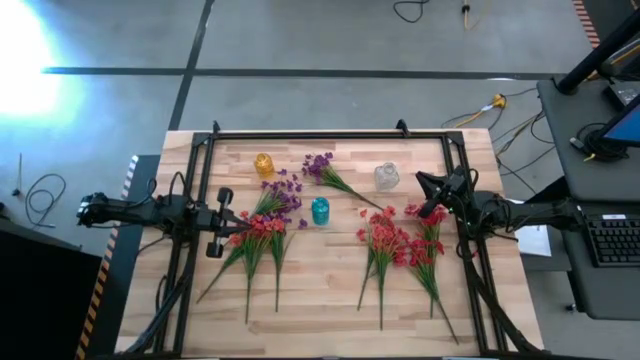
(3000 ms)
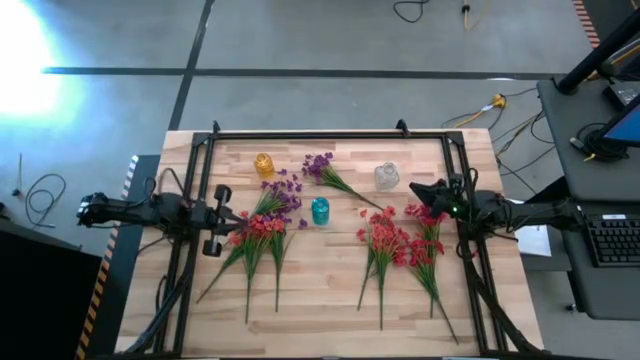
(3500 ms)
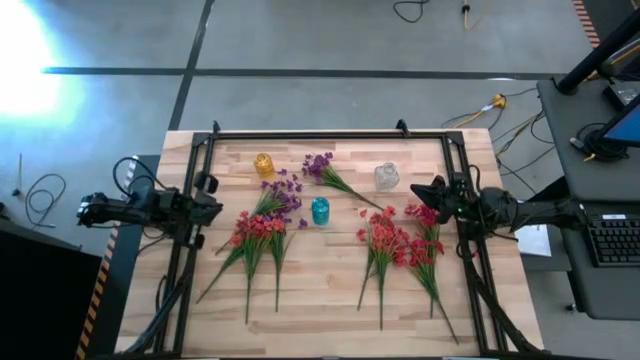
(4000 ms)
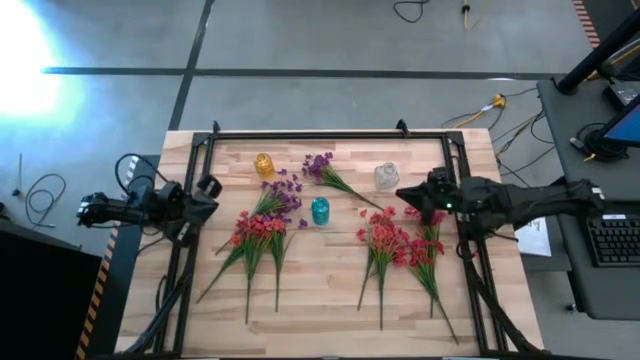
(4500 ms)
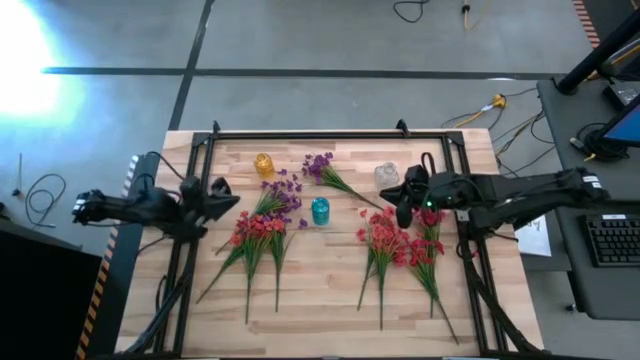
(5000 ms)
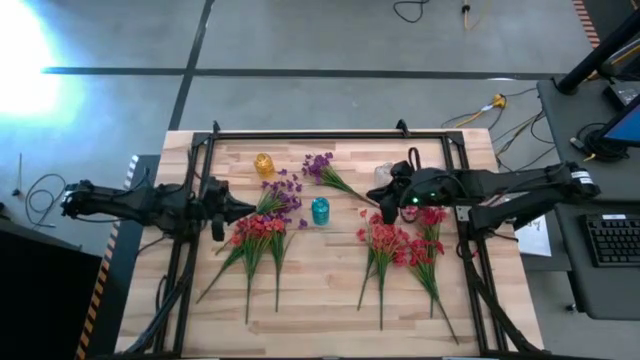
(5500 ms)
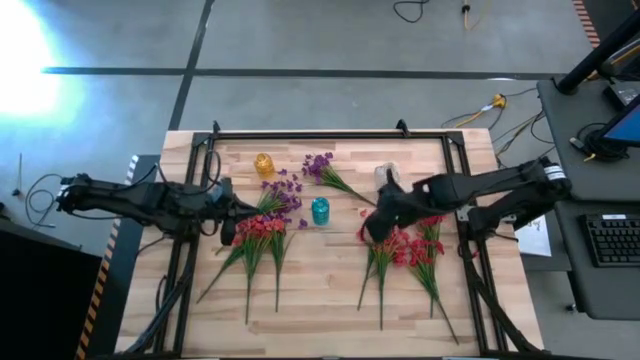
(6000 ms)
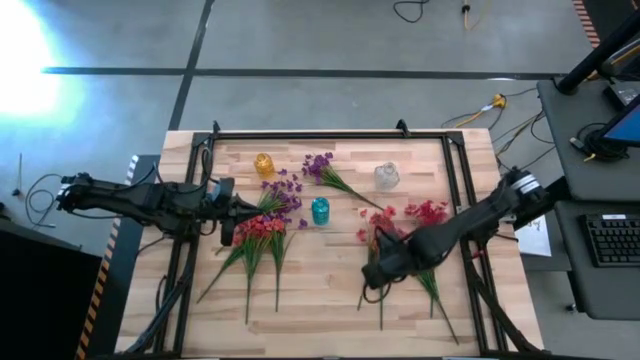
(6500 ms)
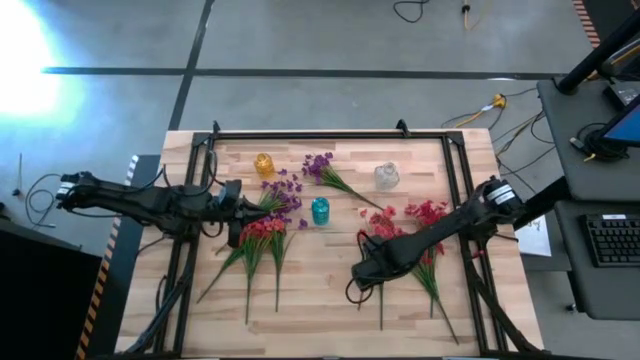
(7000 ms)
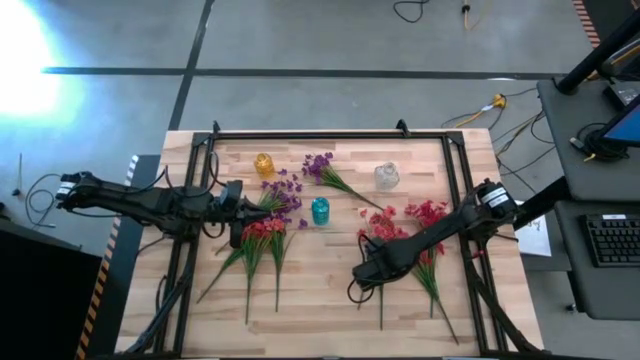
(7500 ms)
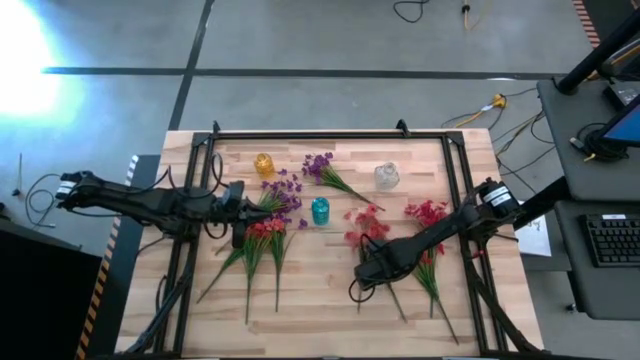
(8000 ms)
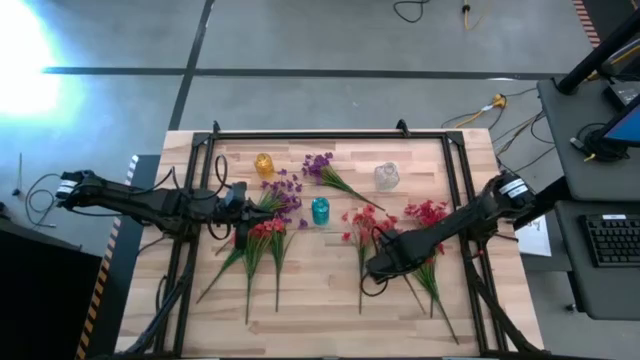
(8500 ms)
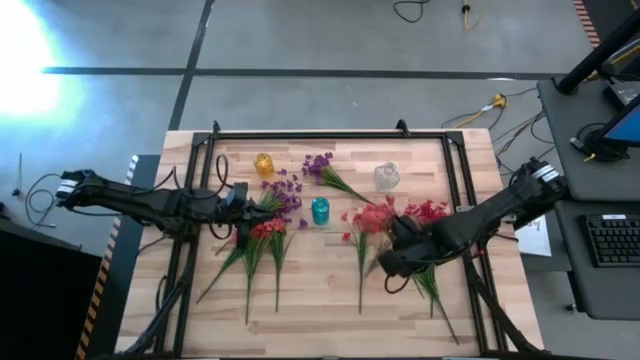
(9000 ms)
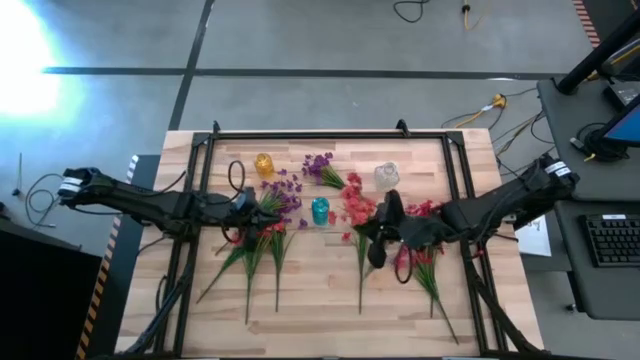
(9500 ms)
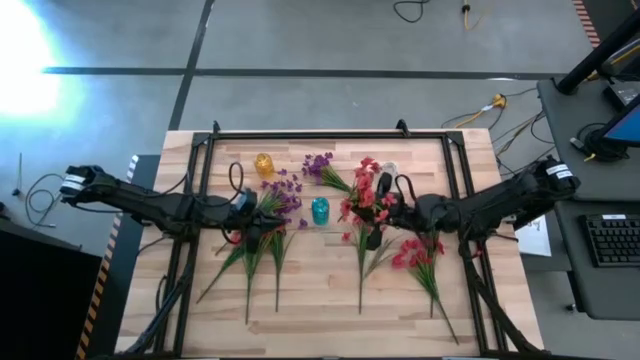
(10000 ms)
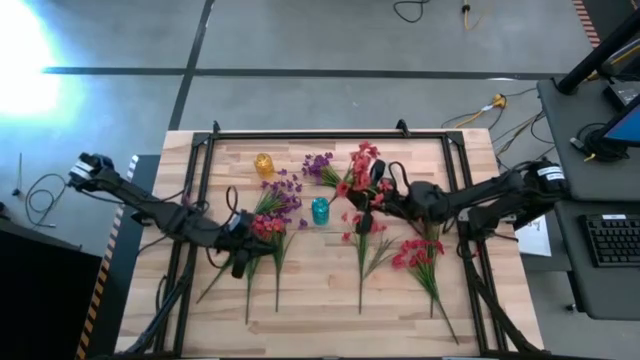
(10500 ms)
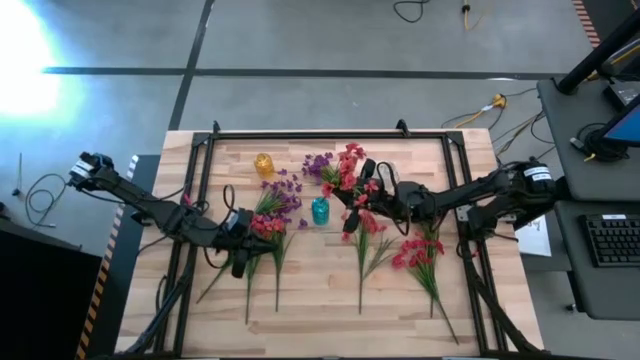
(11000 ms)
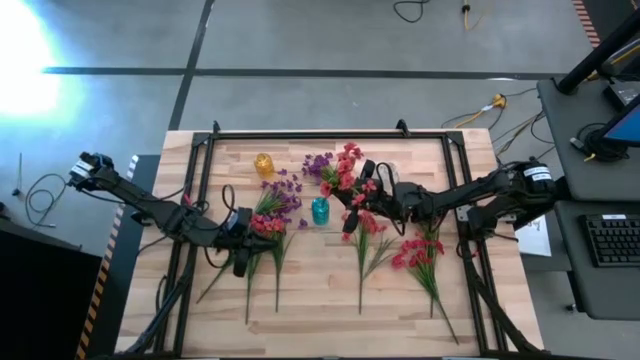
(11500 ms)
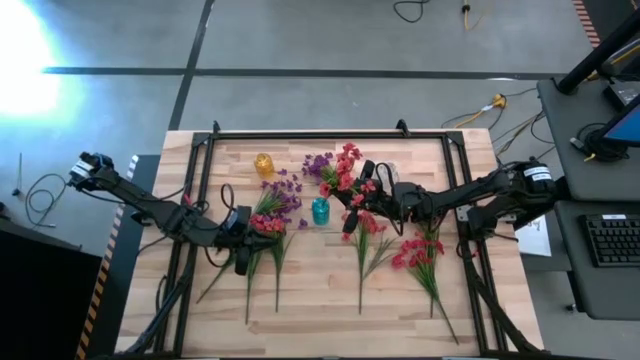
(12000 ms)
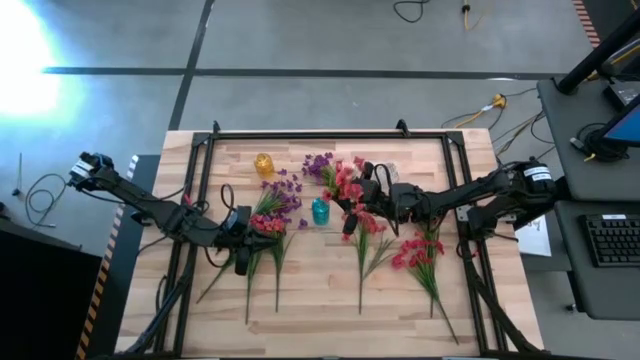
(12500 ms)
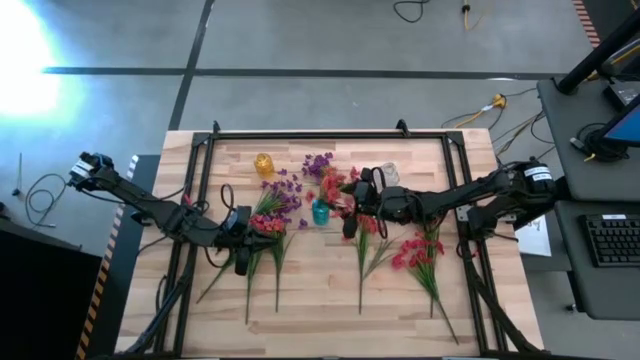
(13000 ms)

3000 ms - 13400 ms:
Task: Sort flowers into vase by color
Put the right orange flowers into the blue vase

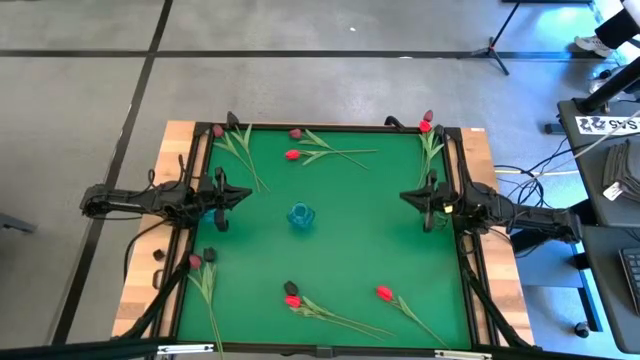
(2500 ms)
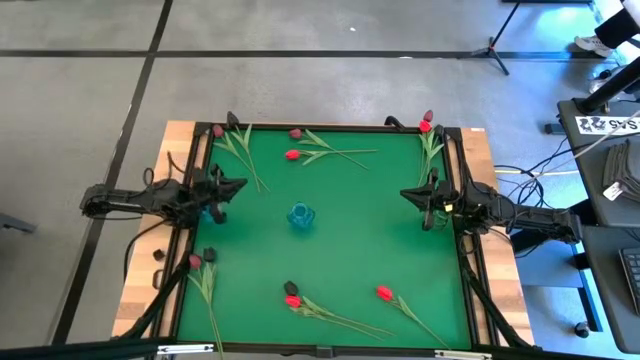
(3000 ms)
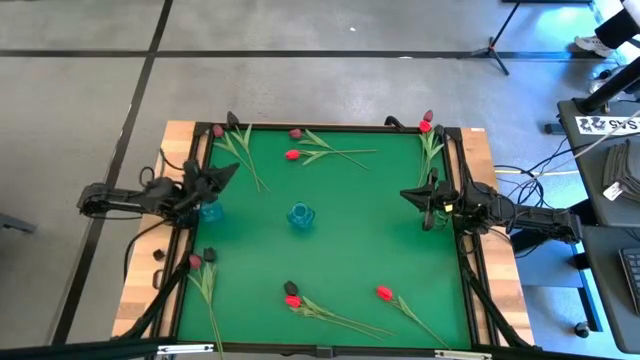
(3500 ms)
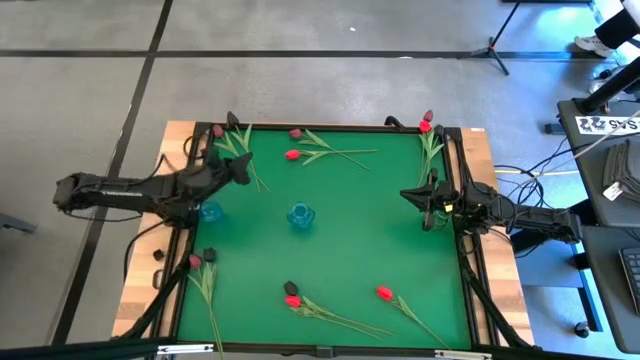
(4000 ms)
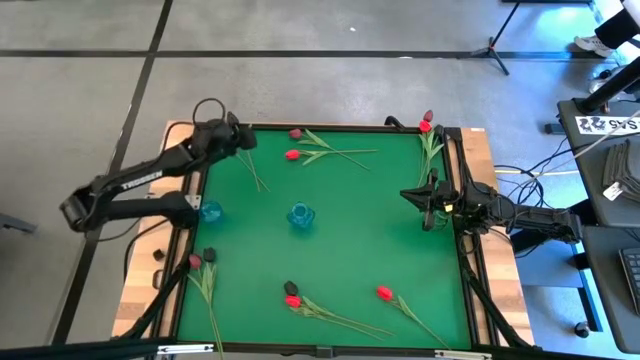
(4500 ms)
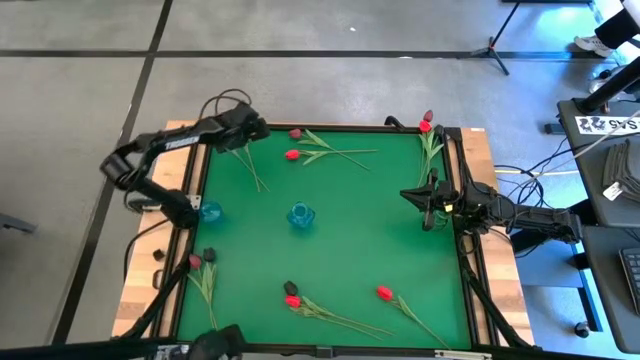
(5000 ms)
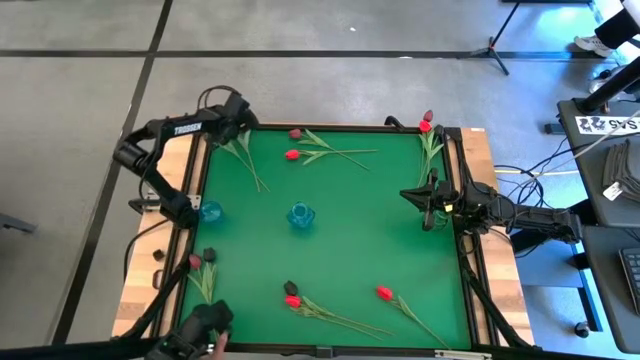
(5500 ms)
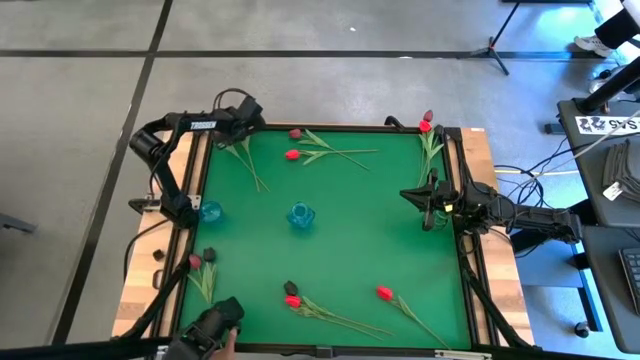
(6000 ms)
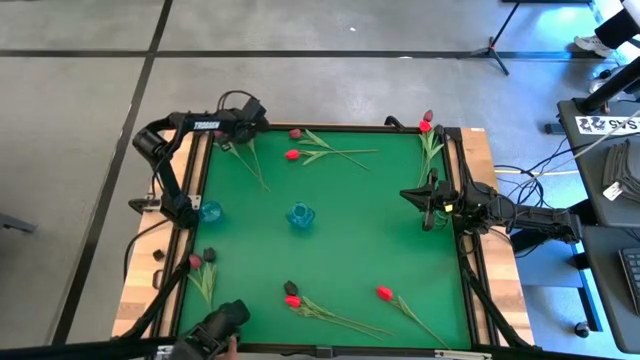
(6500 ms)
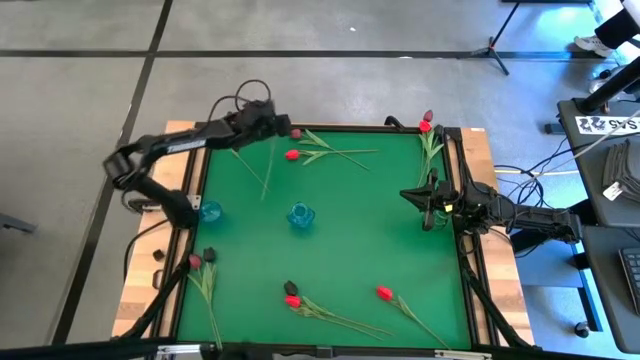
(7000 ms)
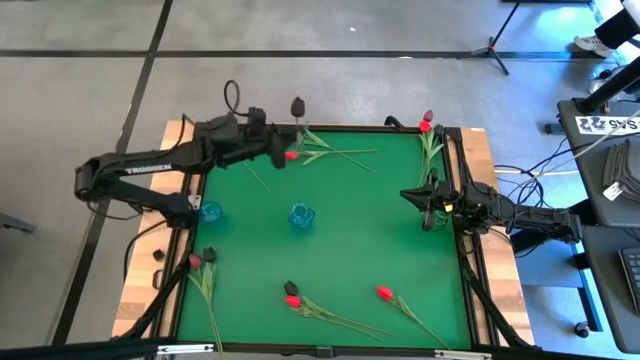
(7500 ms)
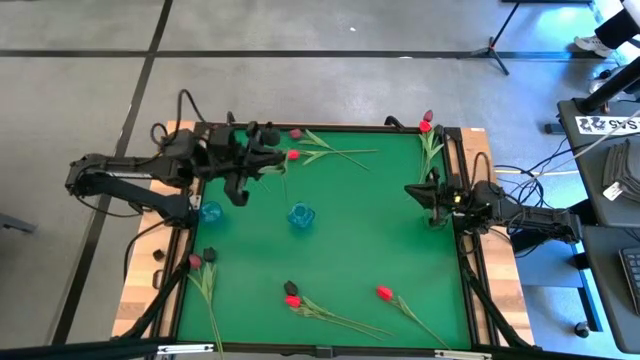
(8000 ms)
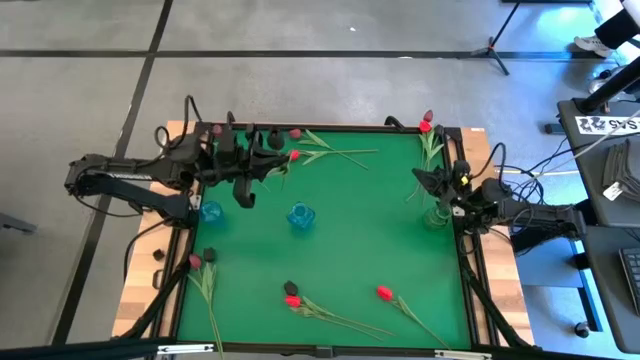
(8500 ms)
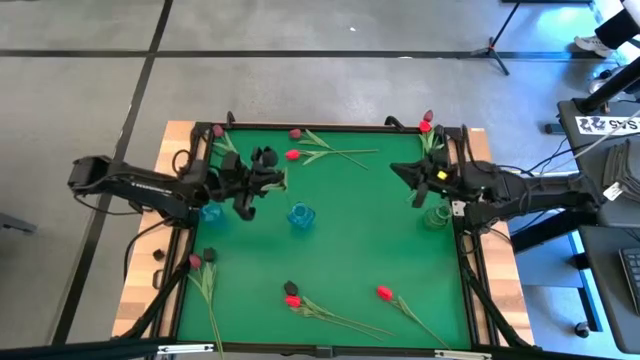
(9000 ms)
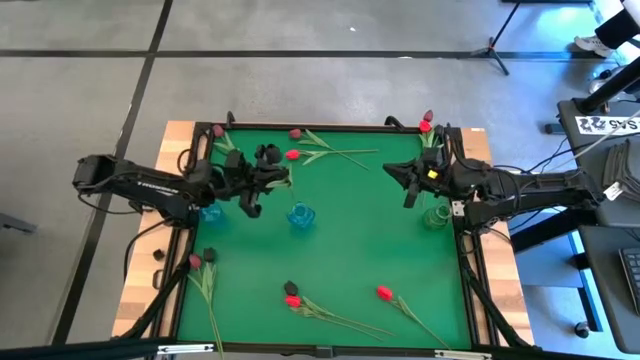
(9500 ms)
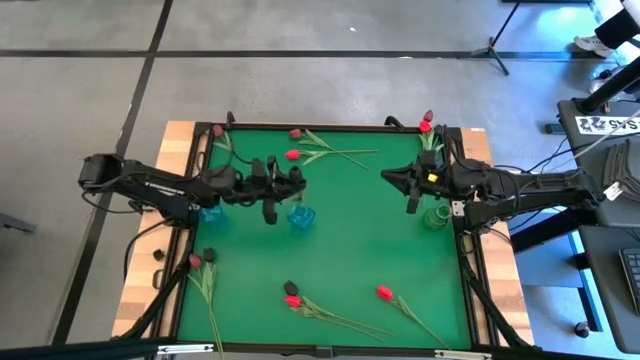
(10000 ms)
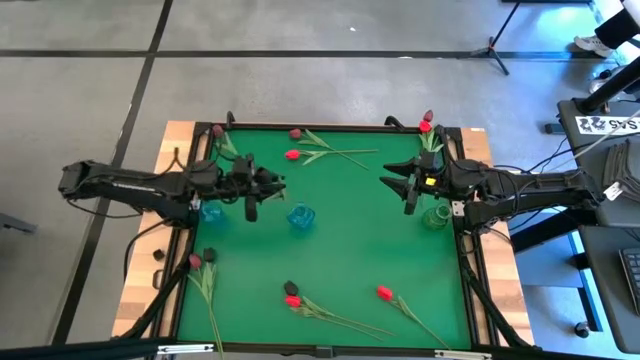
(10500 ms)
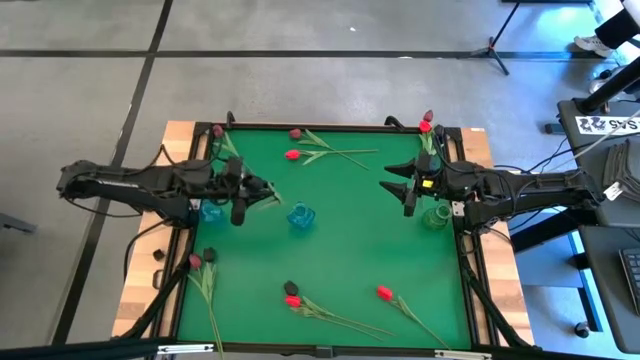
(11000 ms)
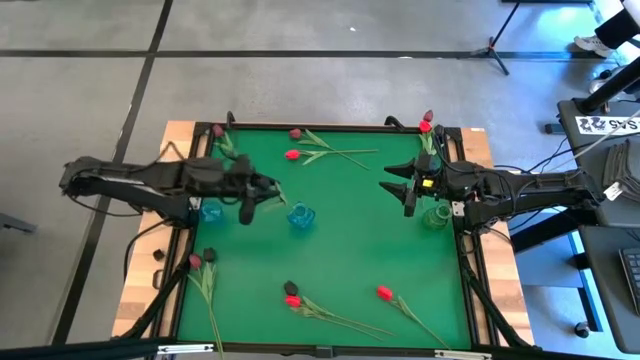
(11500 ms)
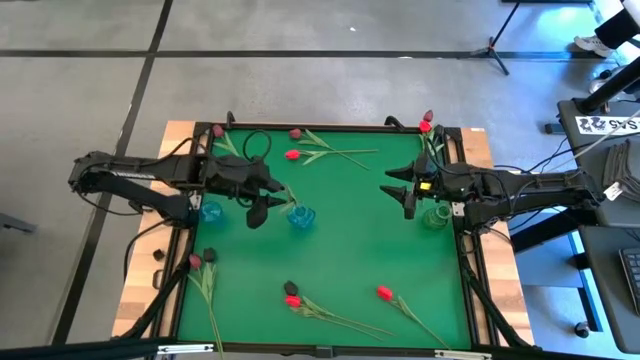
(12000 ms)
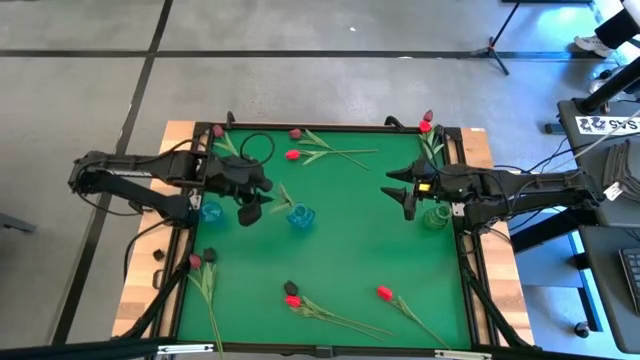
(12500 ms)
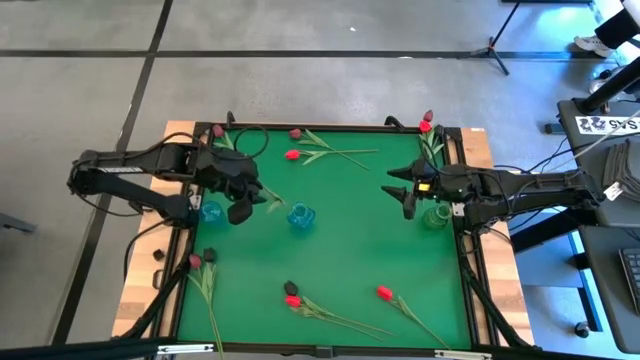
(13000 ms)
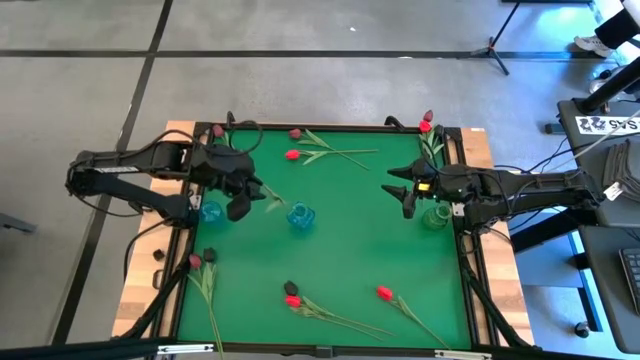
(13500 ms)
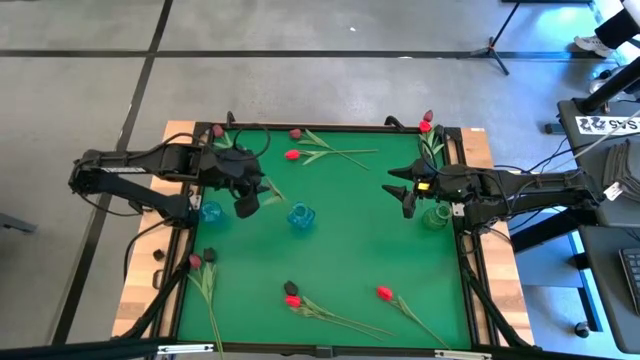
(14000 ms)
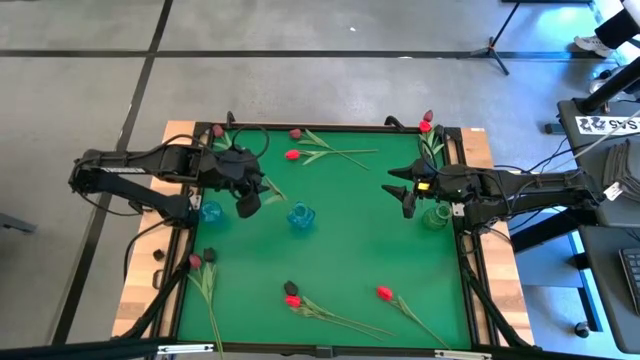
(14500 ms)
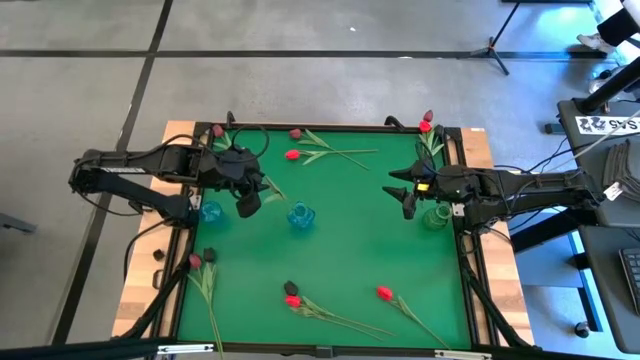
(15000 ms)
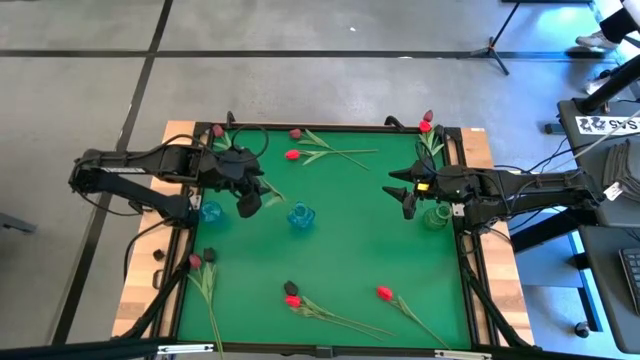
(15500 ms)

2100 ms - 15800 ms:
Task: Sort flowers into vase by color
Put the top left black tulip into the right blue vase
